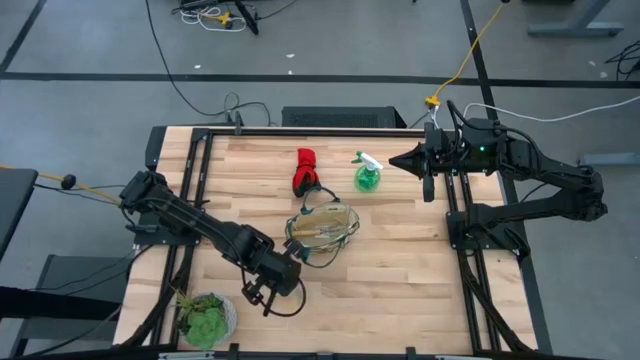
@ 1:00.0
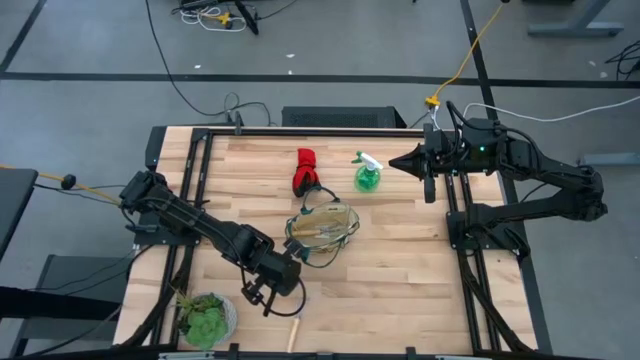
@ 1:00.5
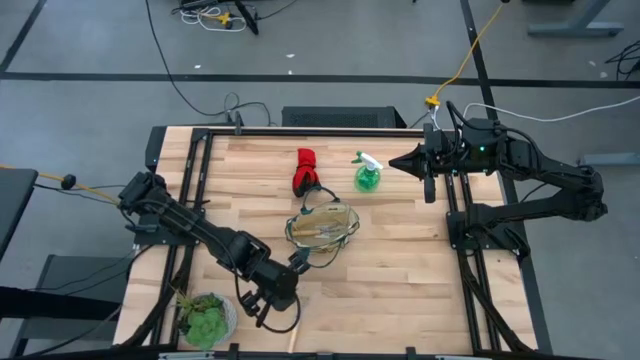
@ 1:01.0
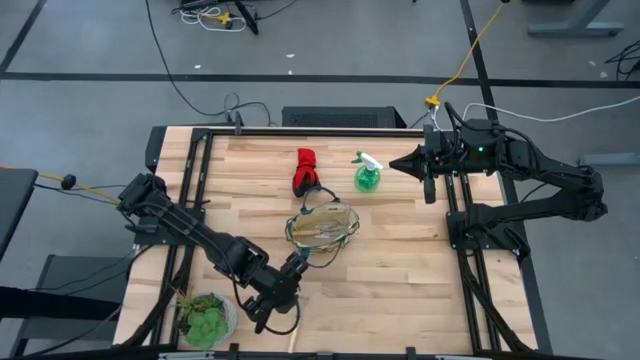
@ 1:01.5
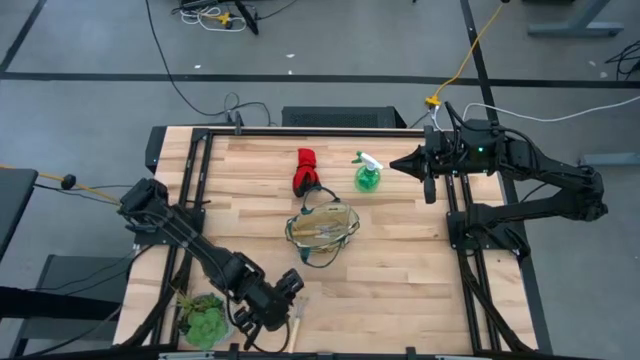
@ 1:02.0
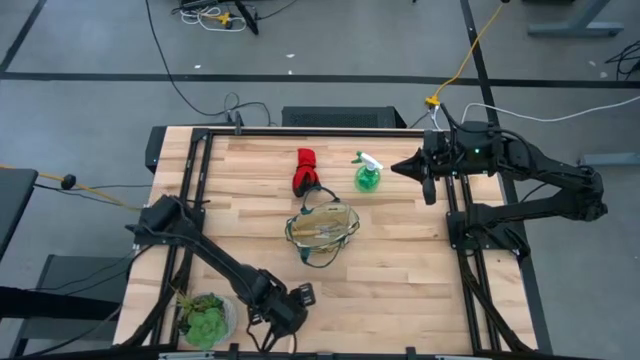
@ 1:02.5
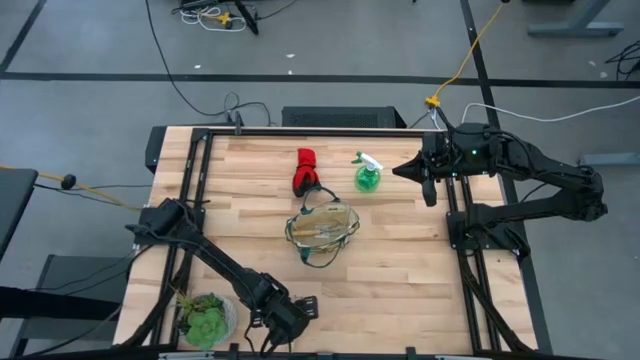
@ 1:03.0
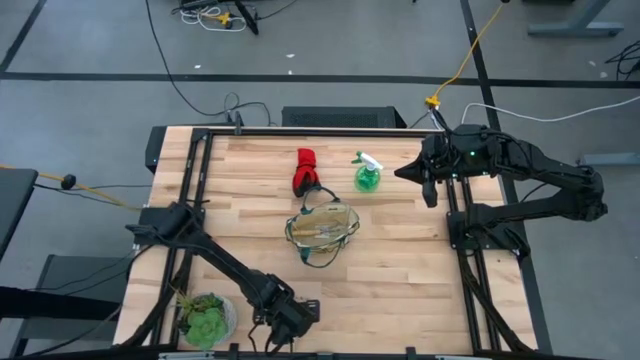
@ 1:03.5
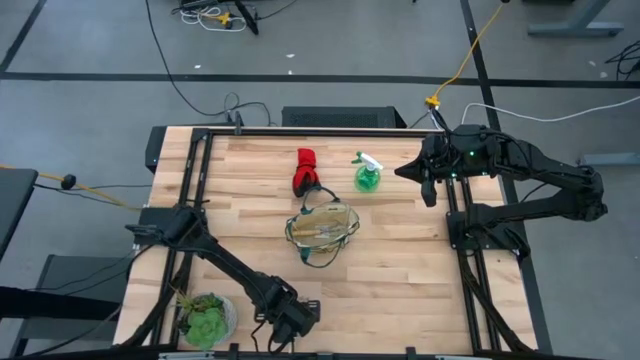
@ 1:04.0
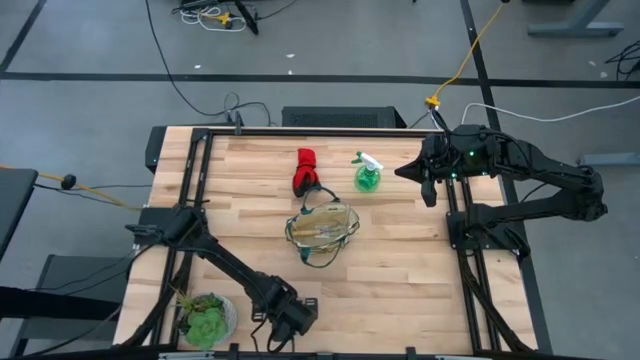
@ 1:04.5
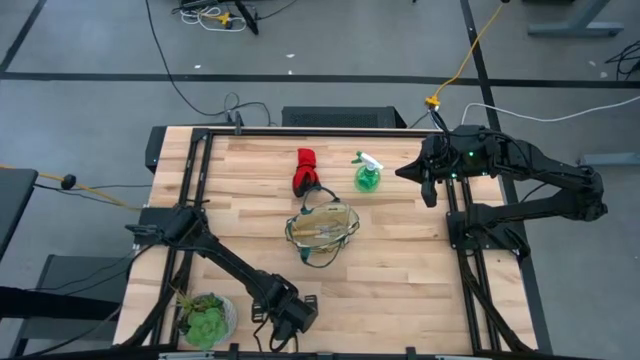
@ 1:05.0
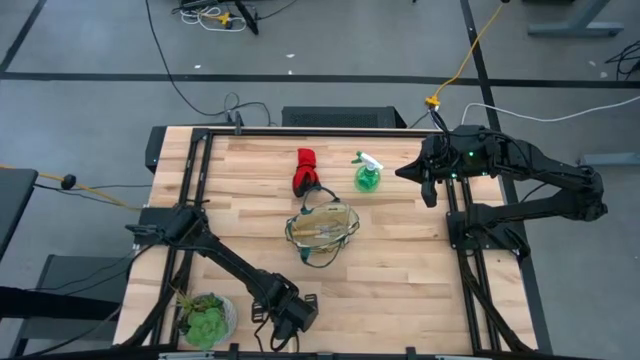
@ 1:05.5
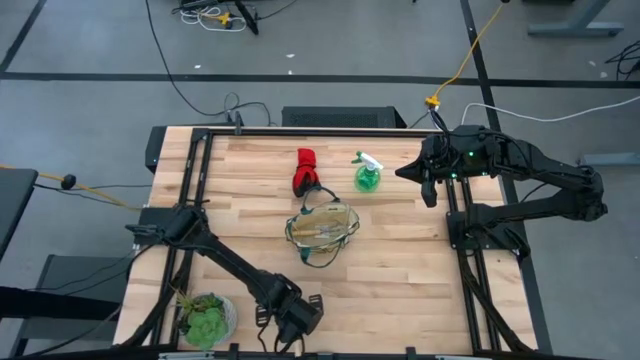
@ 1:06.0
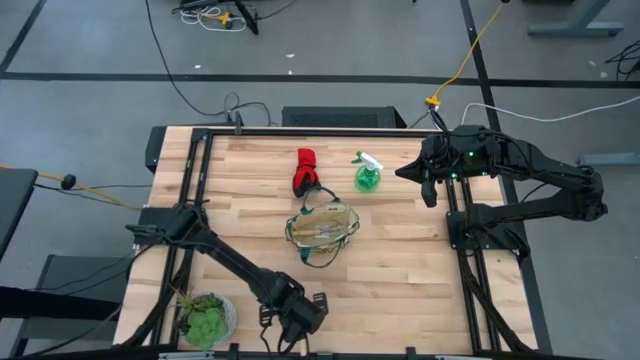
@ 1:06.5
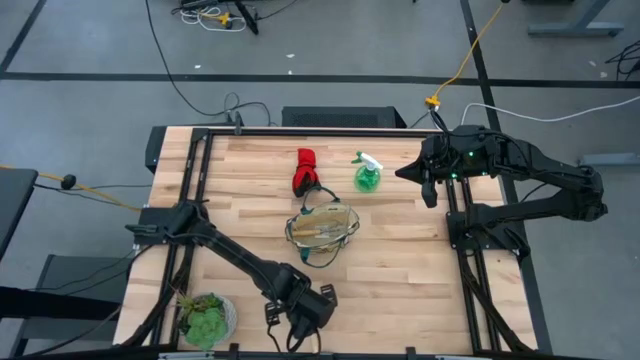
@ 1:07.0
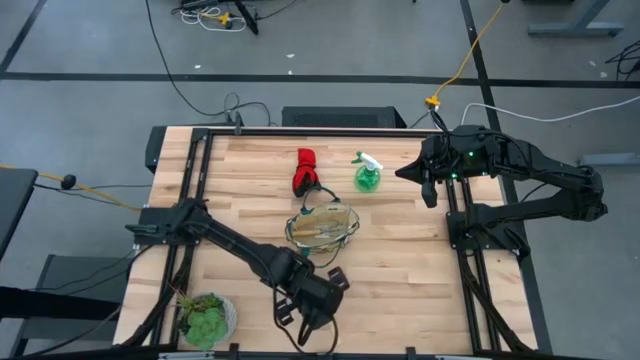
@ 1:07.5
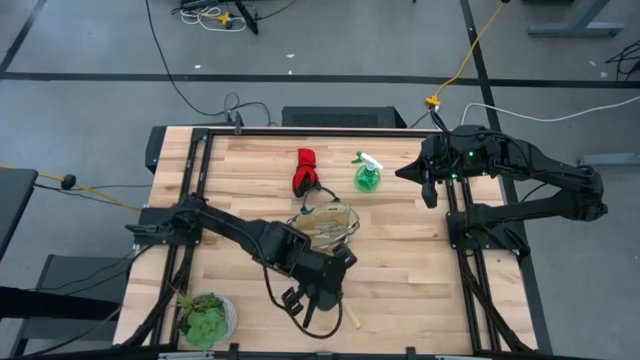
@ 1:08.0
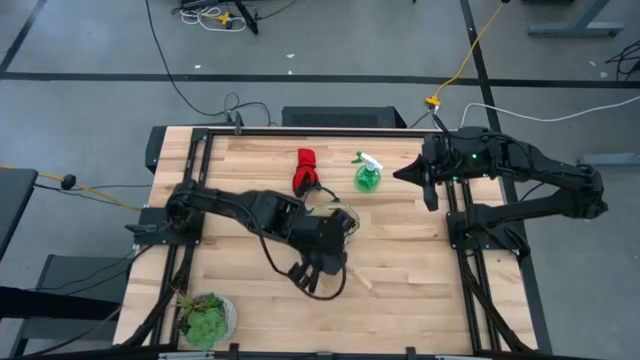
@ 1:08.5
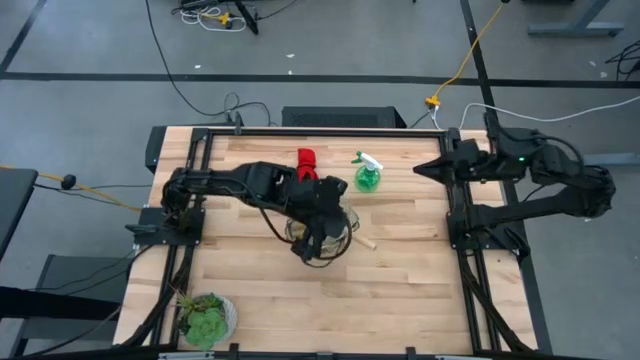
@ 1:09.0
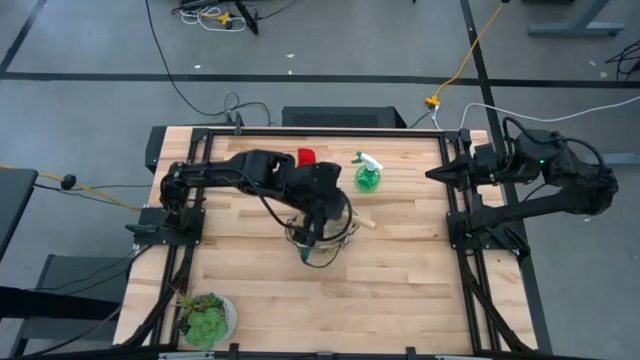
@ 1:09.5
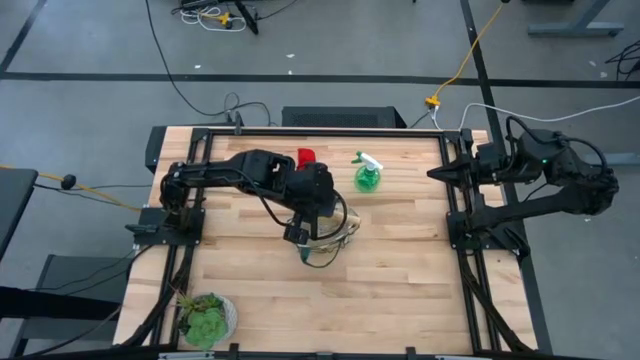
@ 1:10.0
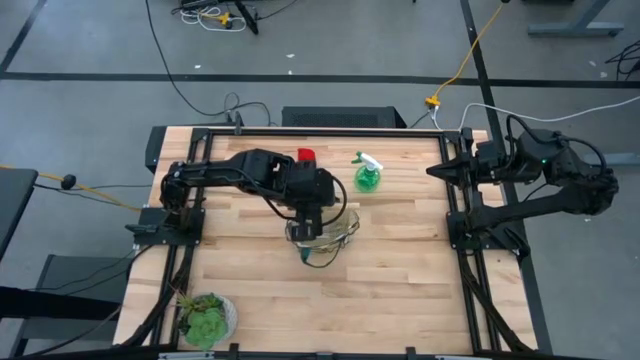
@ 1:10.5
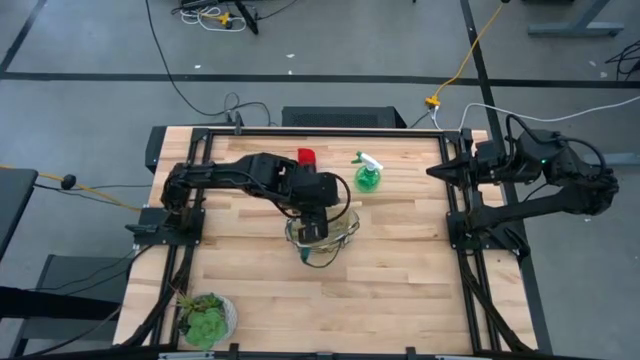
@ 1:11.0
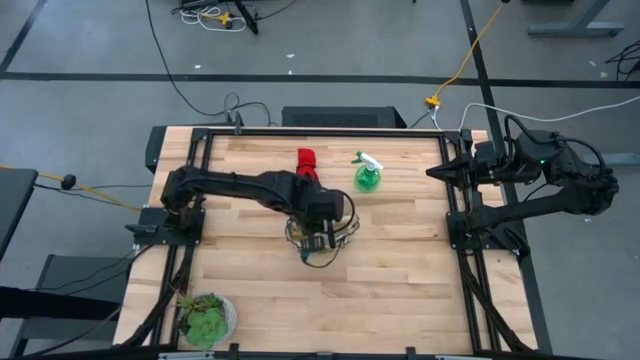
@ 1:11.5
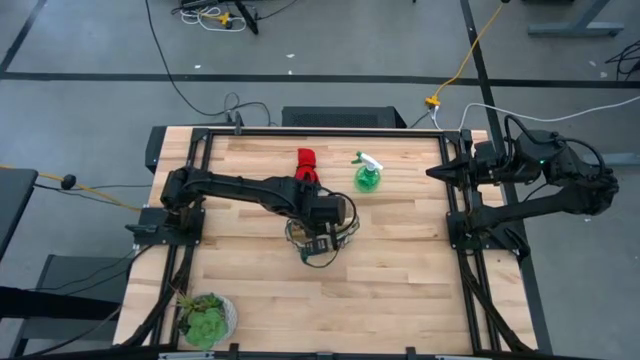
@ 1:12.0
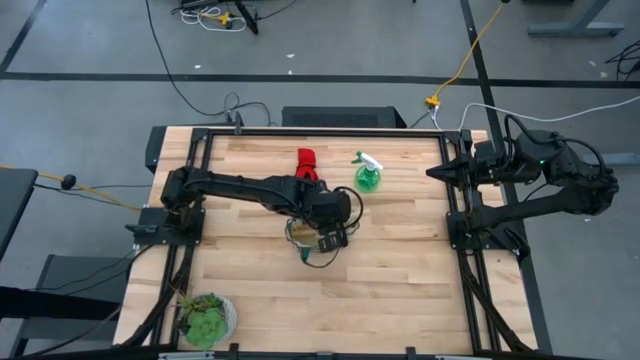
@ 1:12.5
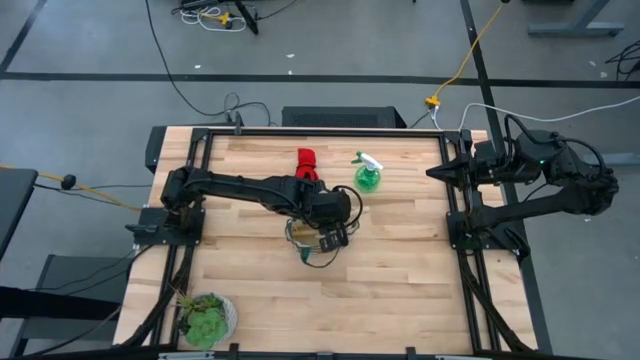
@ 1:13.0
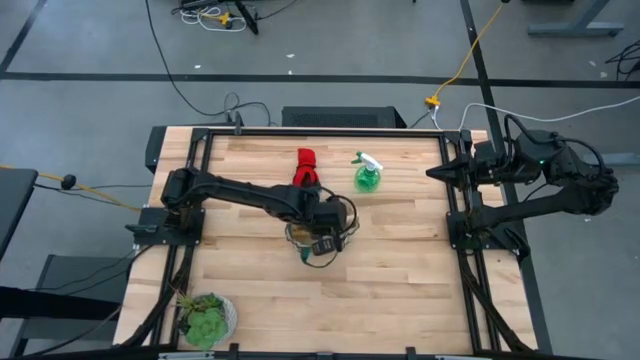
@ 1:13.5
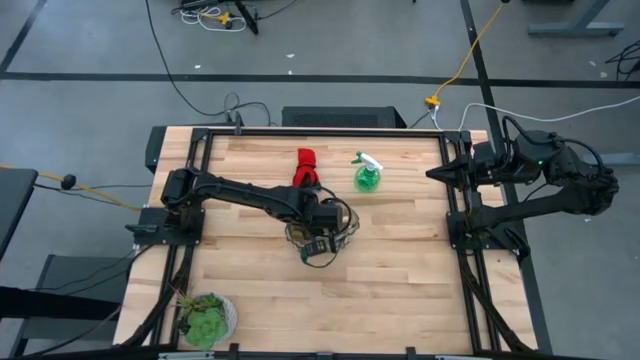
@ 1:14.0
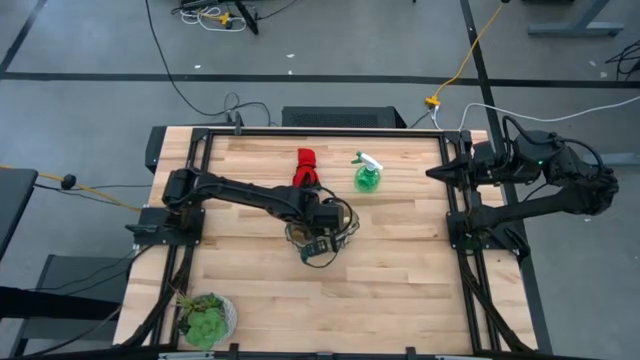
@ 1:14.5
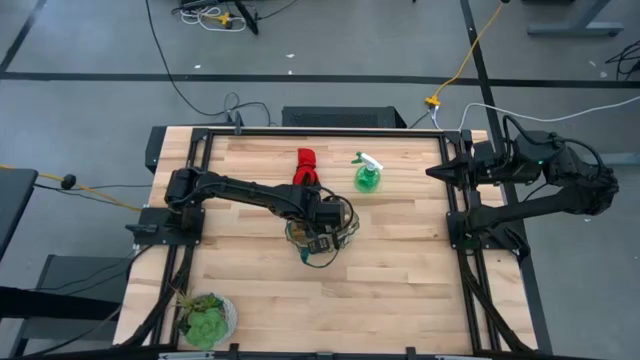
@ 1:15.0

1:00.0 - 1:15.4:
Task: Pick & Place Garden tools in Gardening bag
Put the light brown trowel into the light brown and green gardening bag

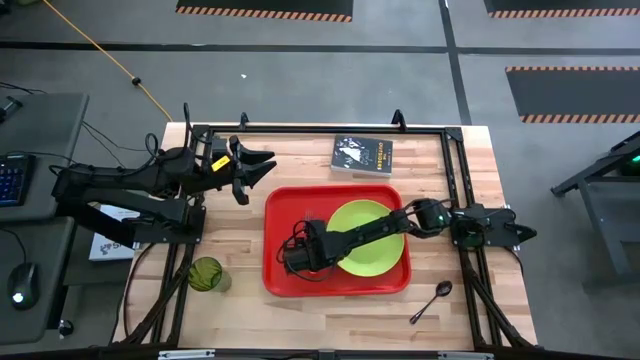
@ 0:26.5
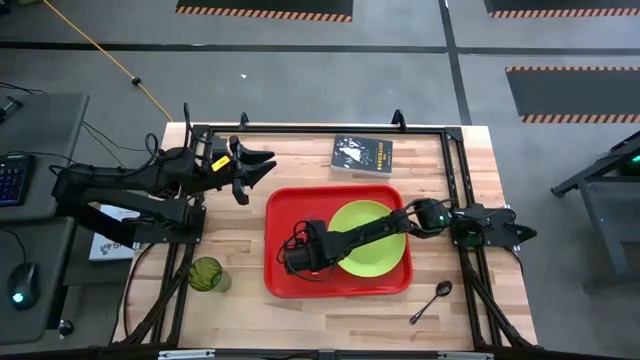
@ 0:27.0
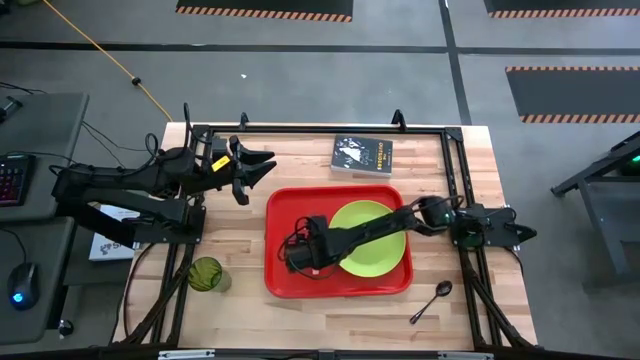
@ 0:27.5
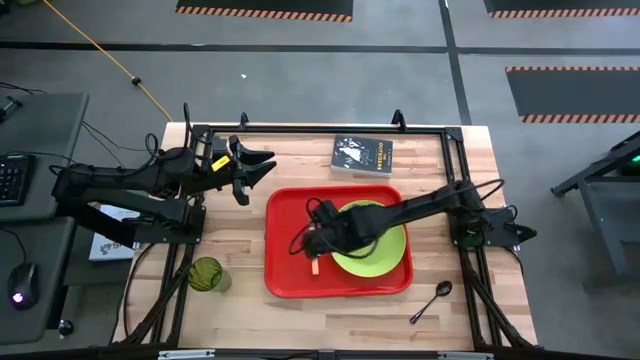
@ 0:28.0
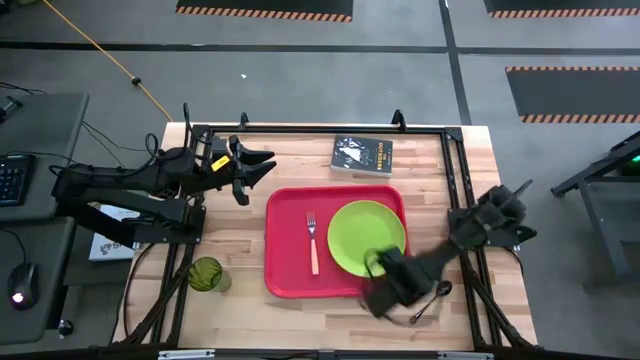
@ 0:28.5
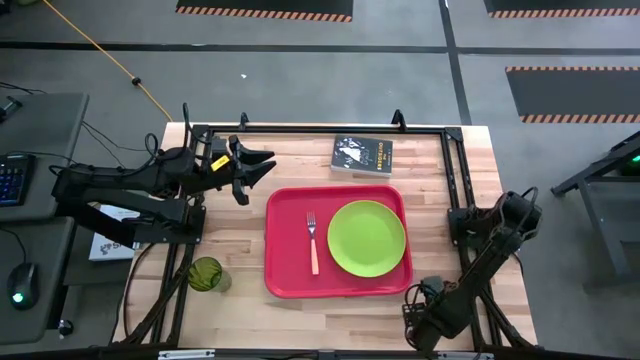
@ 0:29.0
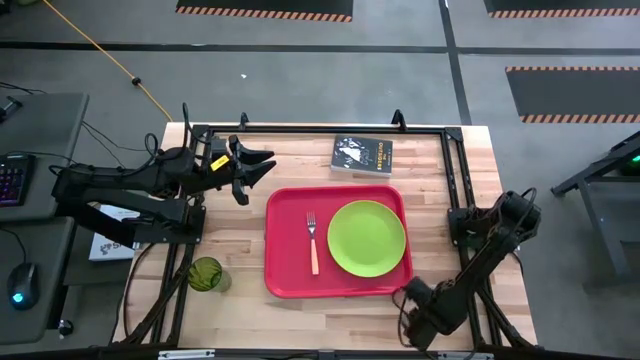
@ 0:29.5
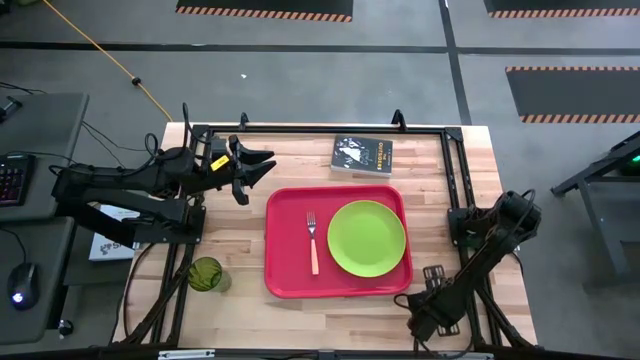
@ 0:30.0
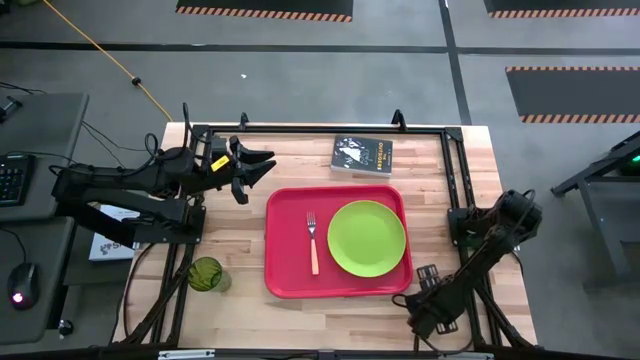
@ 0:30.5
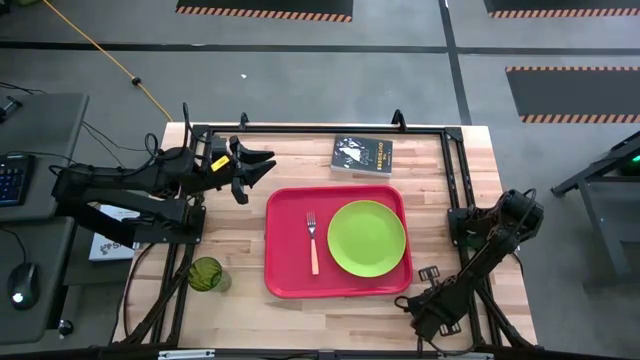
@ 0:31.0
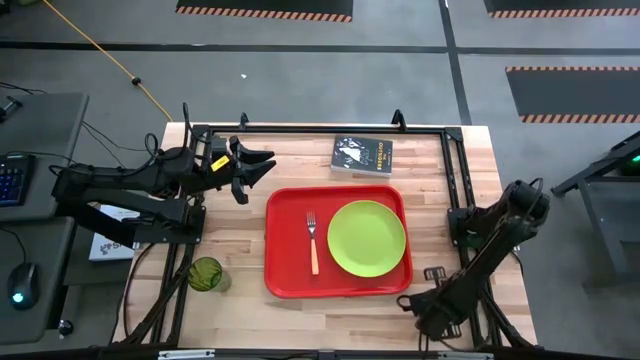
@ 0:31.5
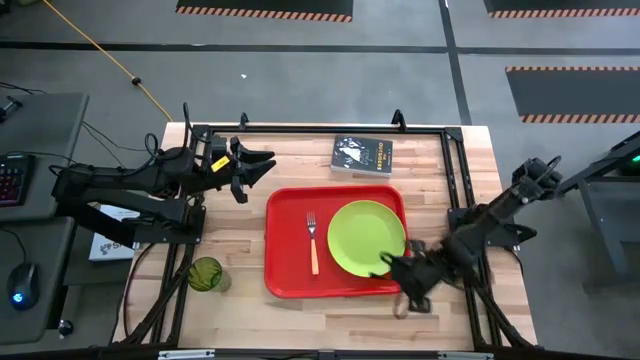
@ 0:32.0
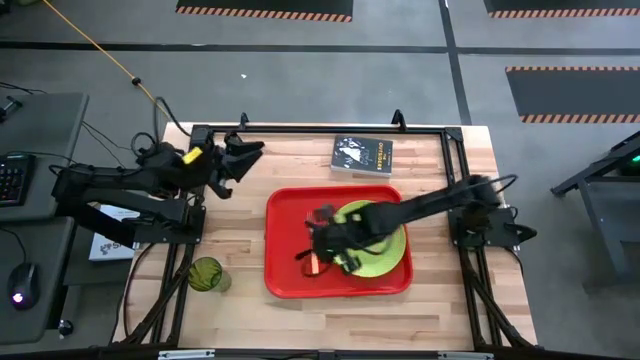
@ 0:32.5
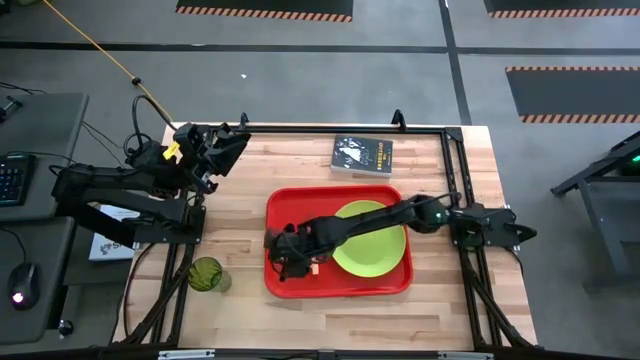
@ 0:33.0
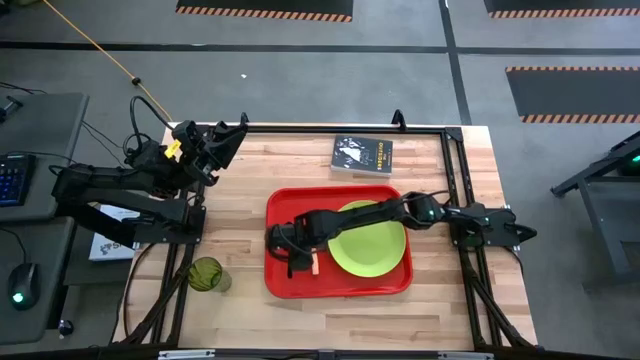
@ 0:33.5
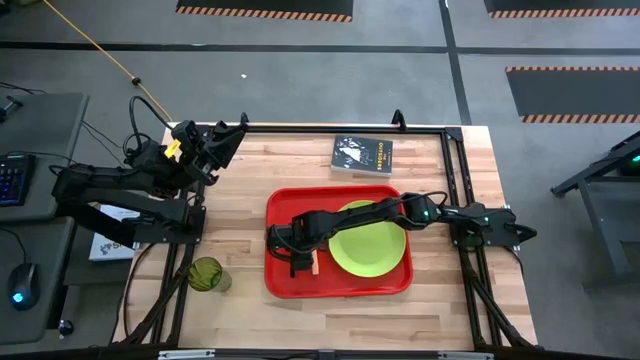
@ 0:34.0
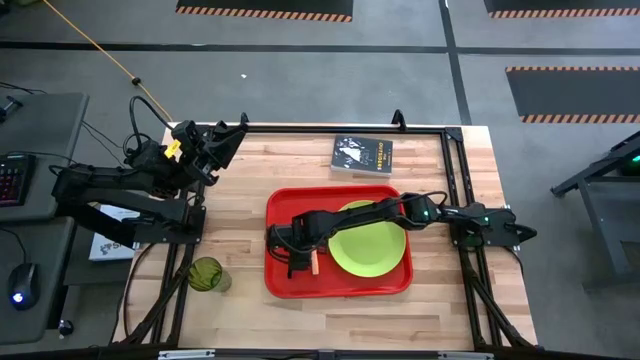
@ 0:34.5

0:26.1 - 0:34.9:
Task: Pick and place plate/cup/fork/spoon on tray
Put the black spoon on the red serving tray to the left of the orange fork
